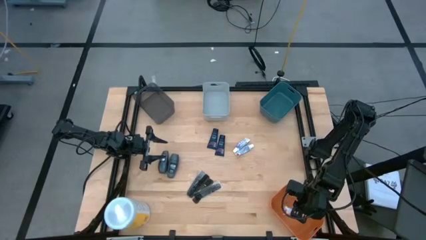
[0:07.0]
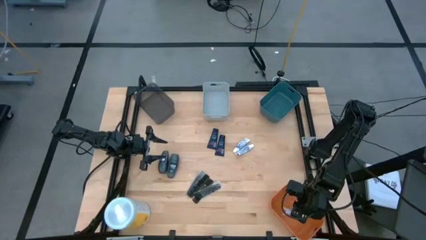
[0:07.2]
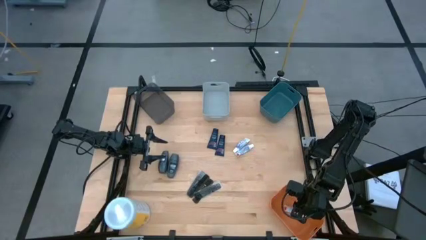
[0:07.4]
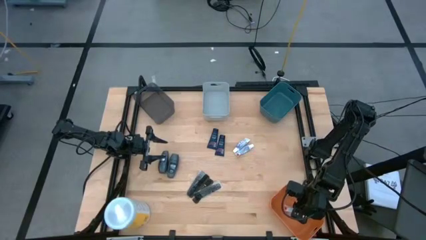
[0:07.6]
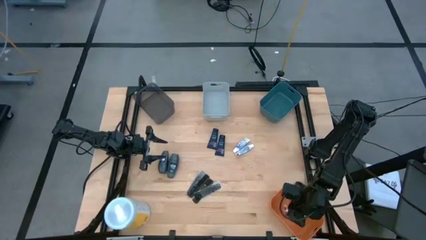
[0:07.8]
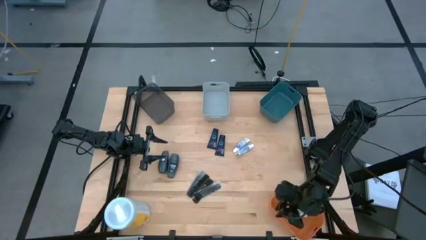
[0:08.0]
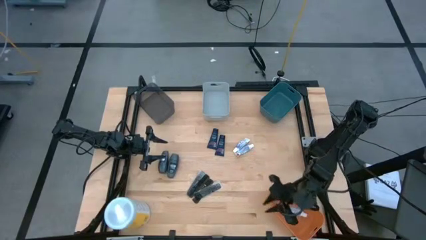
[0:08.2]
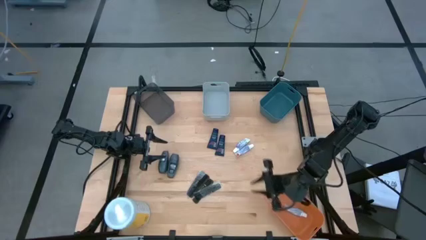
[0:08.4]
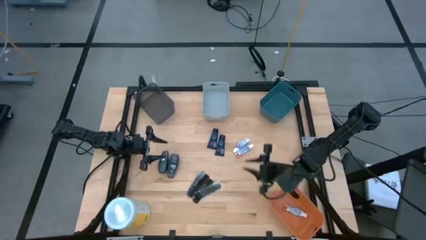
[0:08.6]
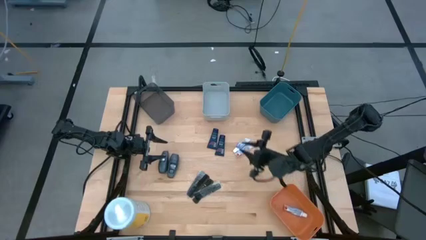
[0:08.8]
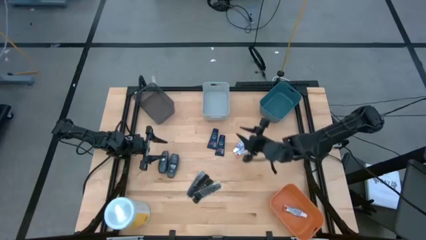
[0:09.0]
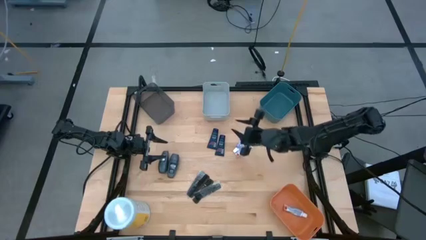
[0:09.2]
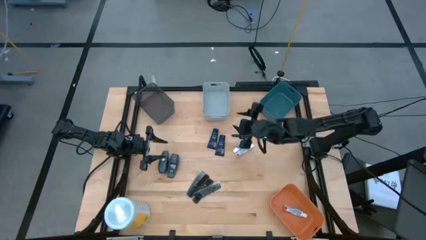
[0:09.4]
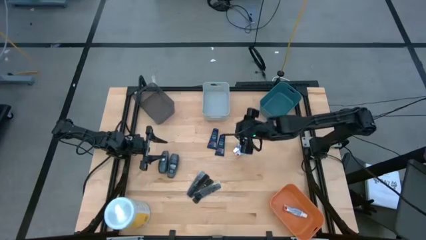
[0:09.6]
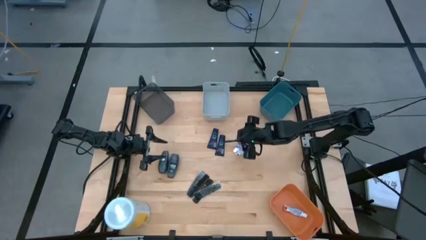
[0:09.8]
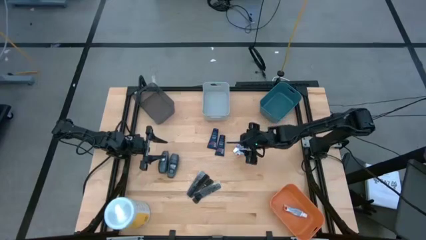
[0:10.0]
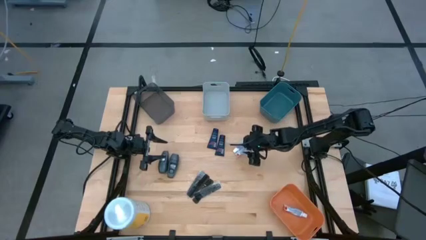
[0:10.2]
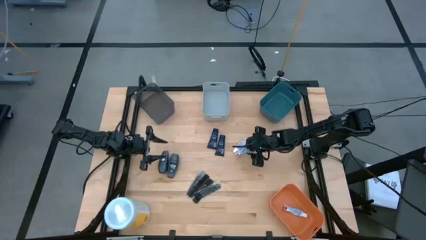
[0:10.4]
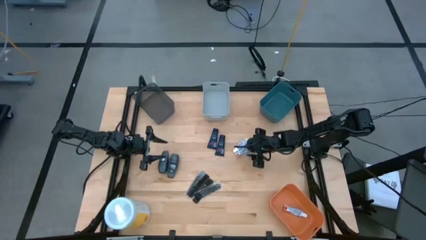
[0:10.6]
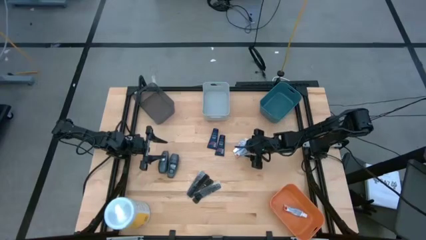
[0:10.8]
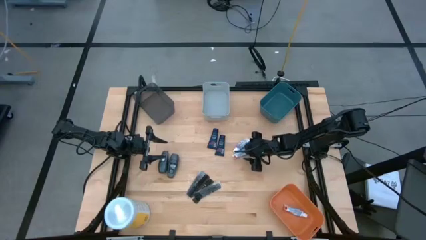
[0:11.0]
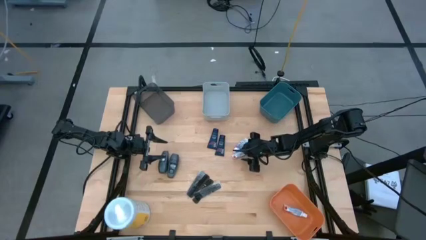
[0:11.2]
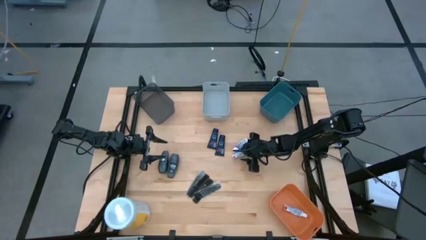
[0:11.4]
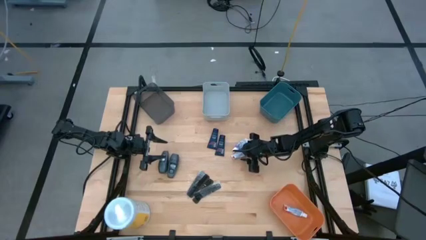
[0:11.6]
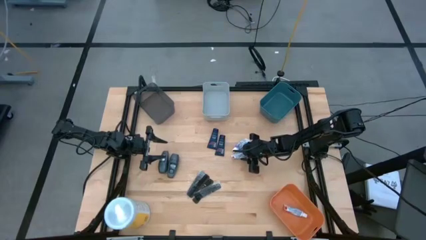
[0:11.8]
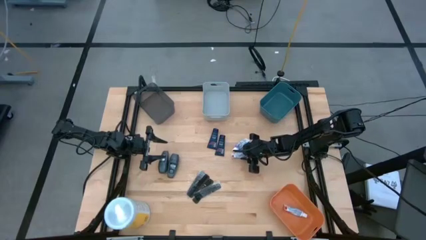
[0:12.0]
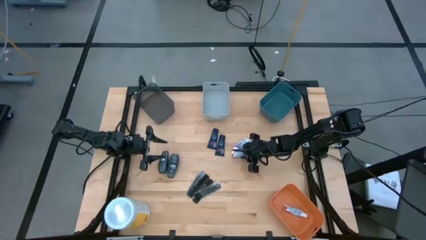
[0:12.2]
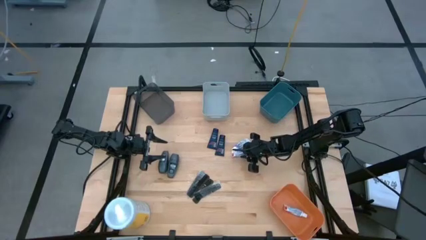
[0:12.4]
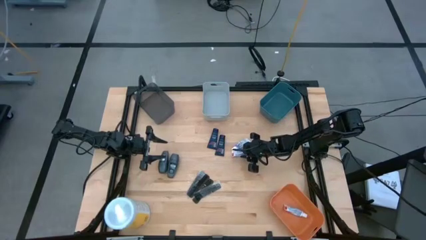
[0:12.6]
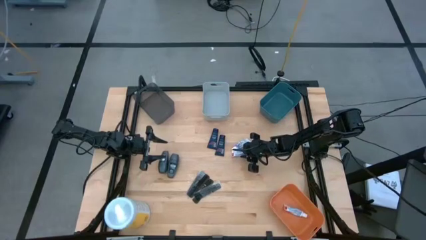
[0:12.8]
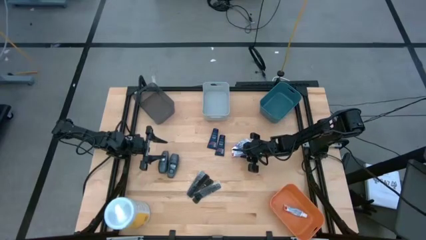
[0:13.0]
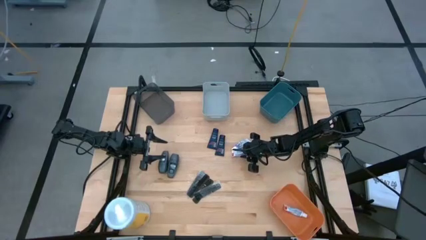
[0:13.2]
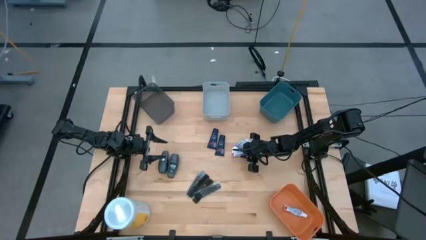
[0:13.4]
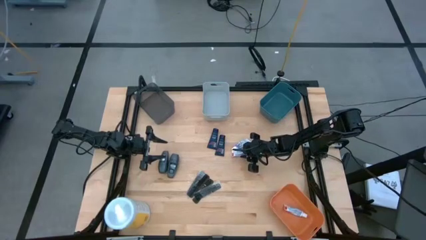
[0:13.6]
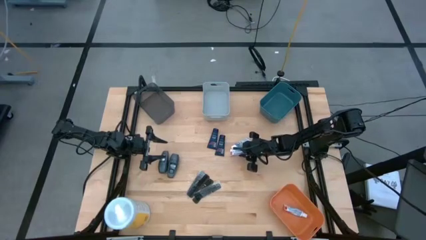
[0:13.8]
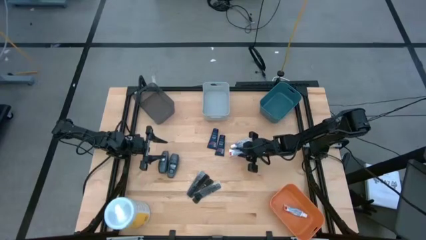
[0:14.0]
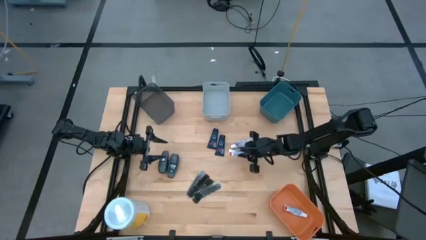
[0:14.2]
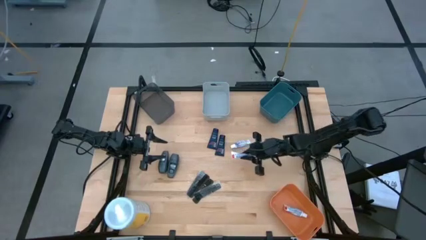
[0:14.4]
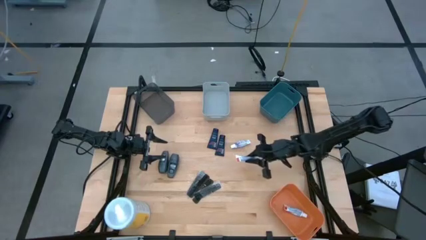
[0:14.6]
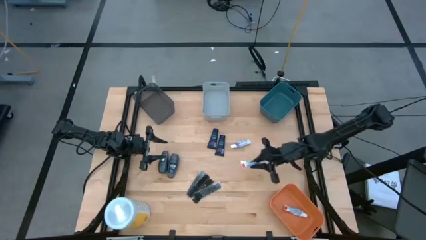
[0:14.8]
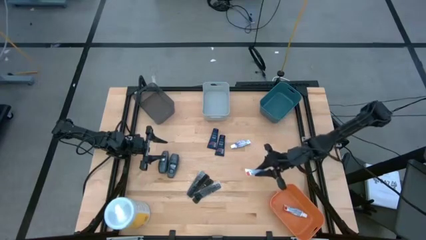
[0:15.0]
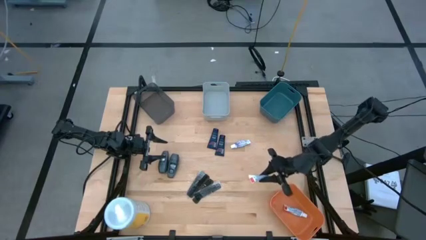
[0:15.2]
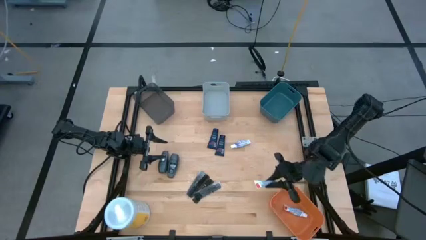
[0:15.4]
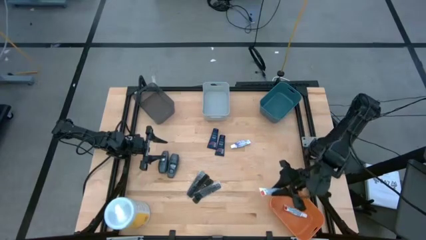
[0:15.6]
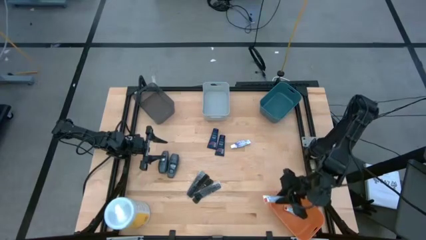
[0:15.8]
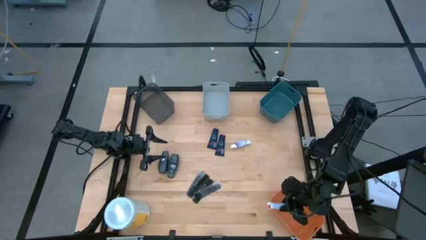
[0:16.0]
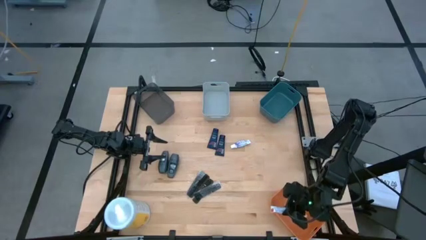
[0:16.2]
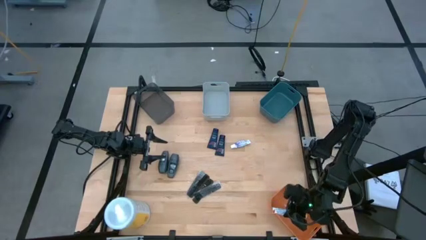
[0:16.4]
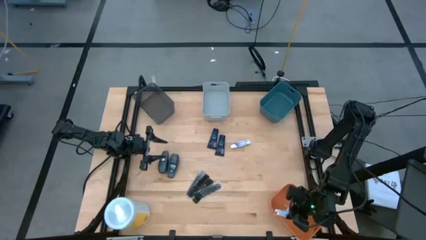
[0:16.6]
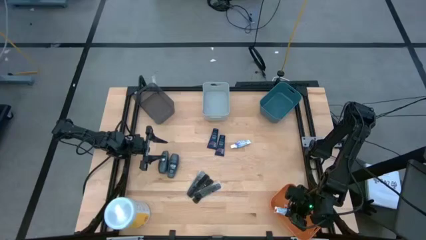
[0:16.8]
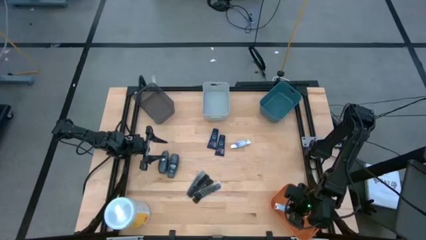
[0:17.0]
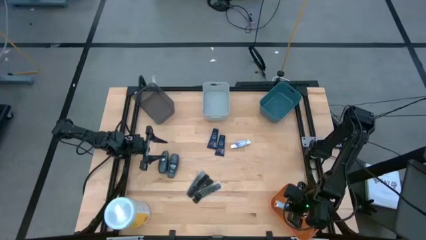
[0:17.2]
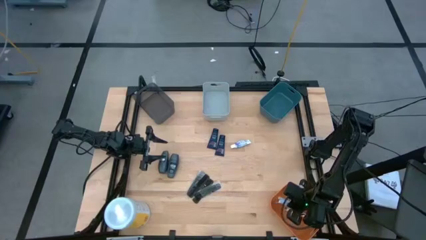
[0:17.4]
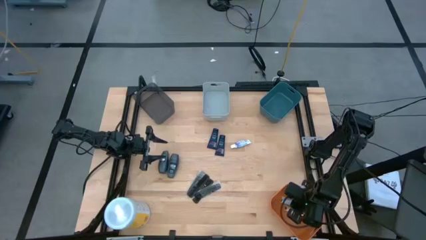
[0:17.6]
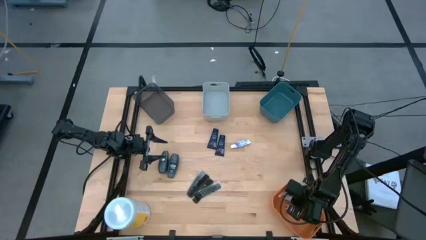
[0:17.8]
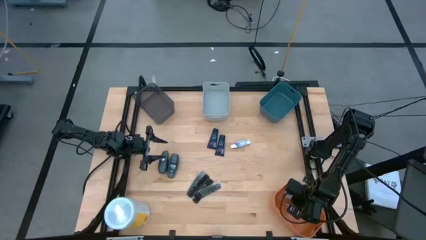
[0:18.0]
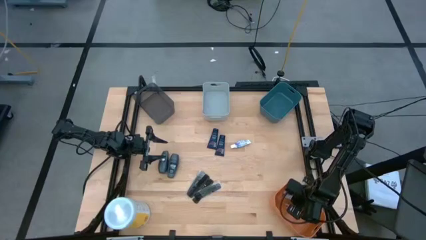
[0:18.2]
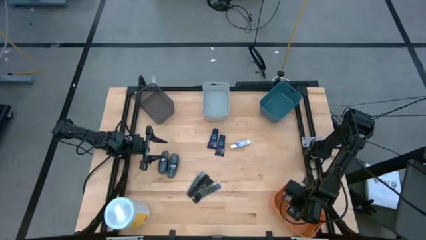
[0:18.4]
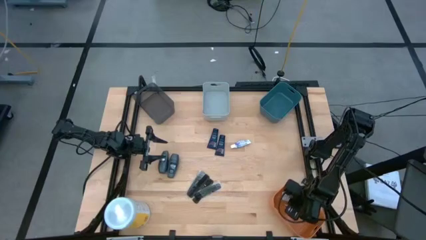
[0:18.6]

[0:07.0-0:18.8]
Task: Pick & Place Travel size toiletries
Put the bottom white toothpaste into the orange bin
